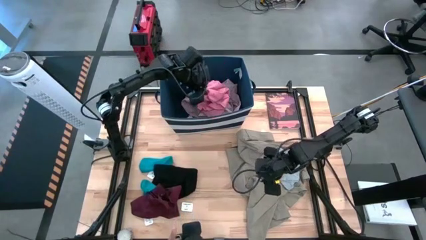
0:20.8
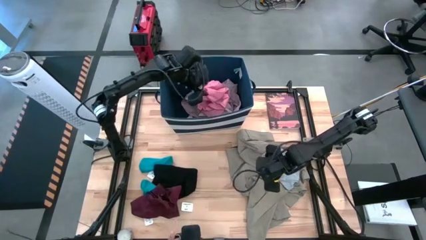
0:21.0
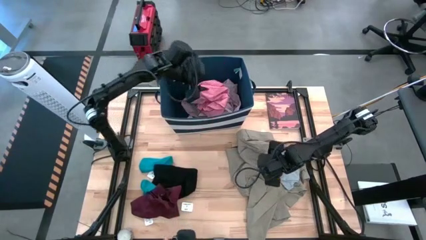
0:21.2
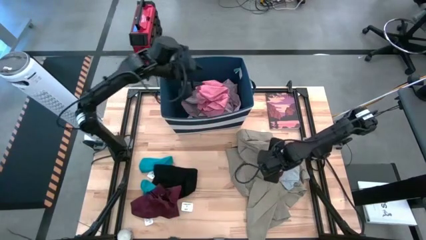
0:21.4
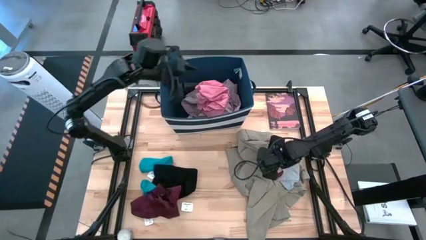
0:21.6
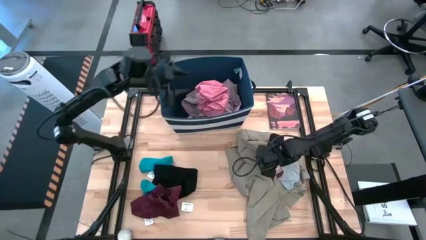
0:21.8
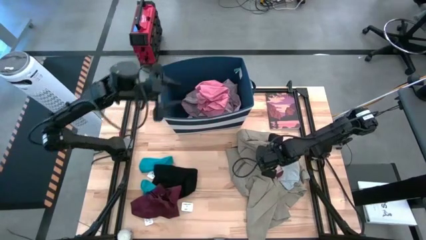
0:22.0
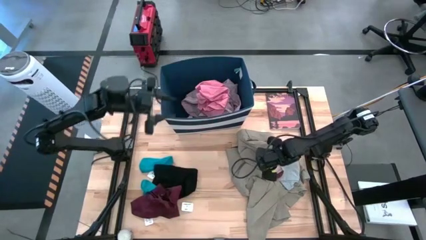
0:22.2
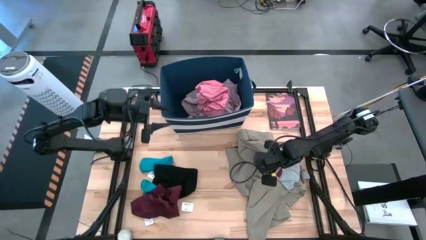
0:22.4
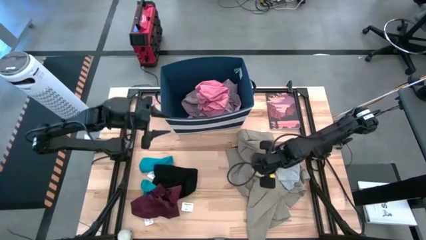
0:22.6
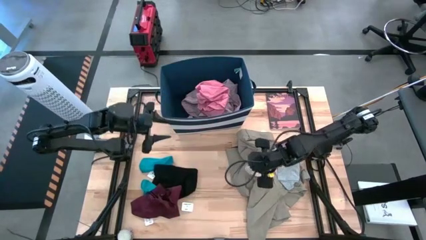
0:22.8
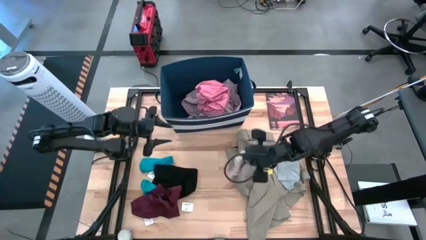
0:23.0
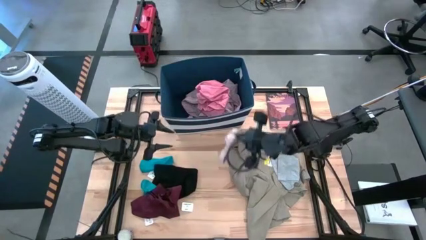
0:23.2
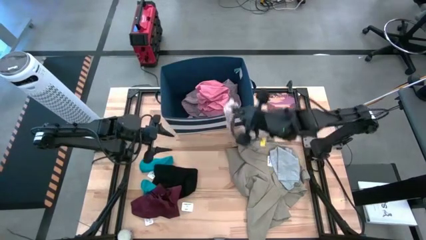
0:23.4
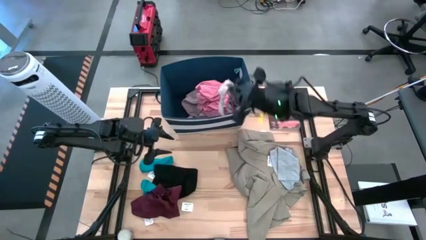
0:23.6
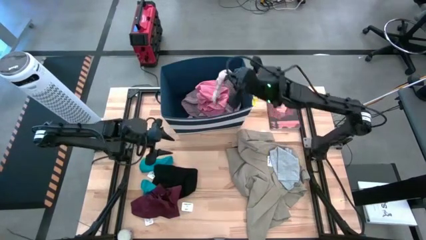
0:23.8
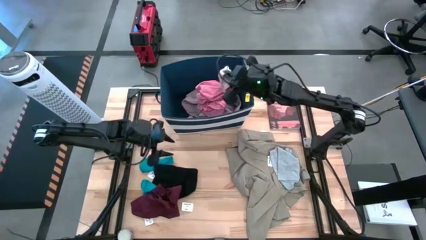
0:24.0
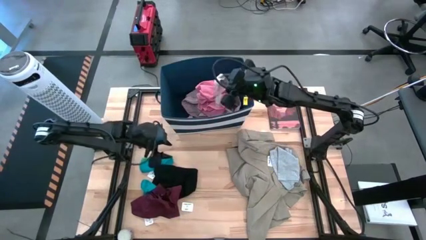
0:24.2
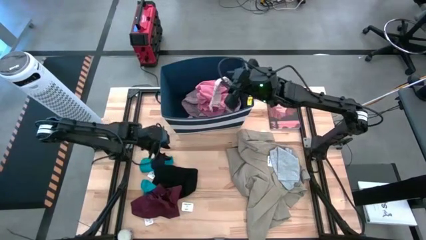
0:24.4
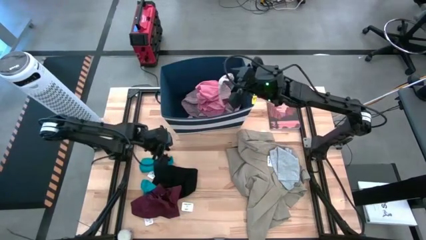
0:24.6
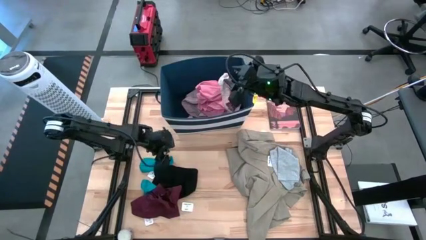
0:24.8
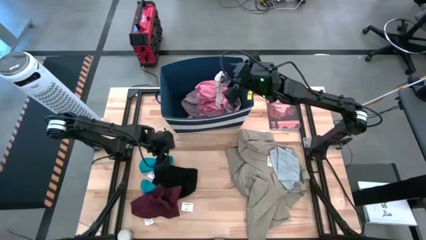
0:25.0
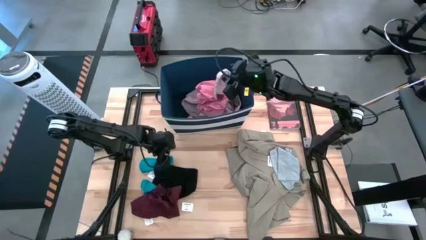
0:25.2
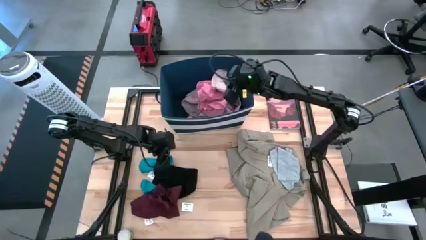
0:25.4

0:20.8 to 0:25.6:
Task: Sort clothes
Put the pink sock into the blue laundry bin

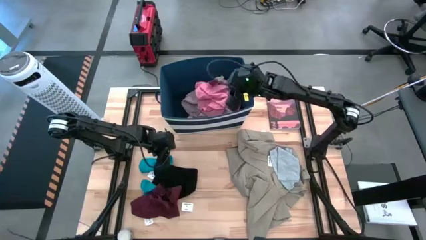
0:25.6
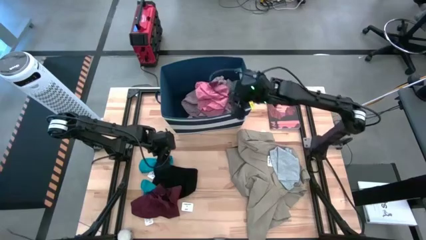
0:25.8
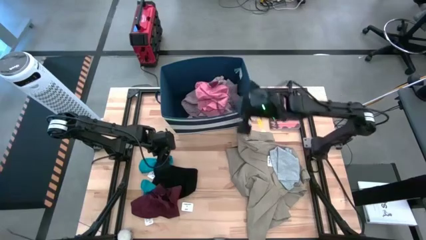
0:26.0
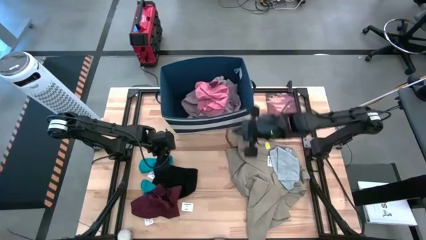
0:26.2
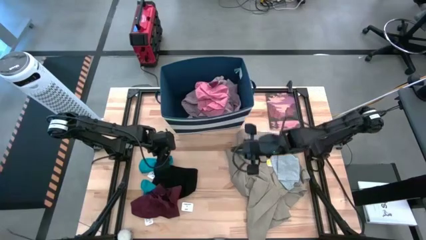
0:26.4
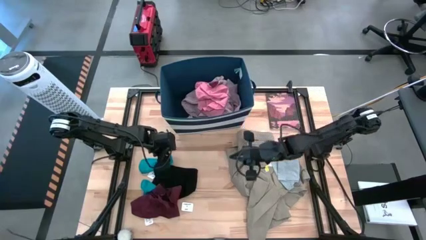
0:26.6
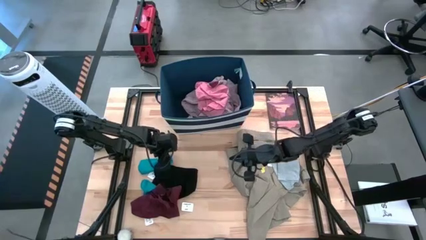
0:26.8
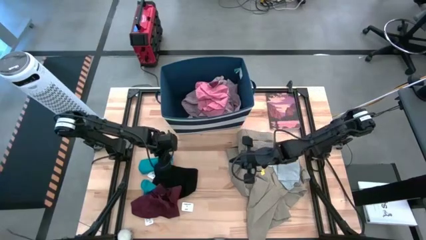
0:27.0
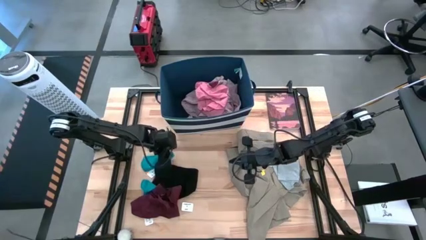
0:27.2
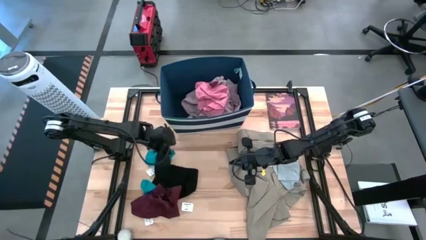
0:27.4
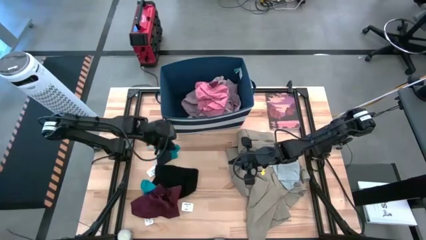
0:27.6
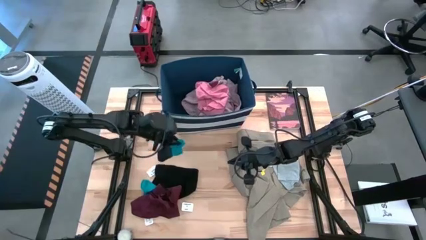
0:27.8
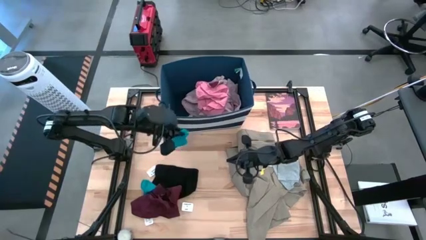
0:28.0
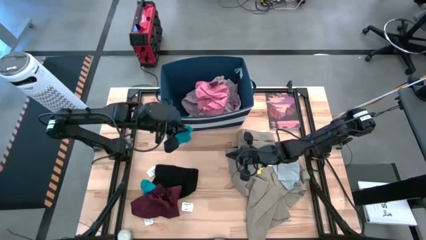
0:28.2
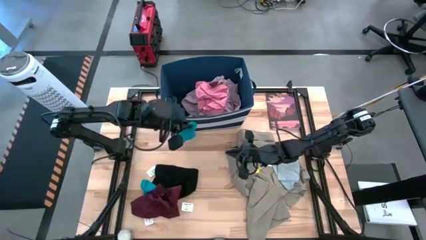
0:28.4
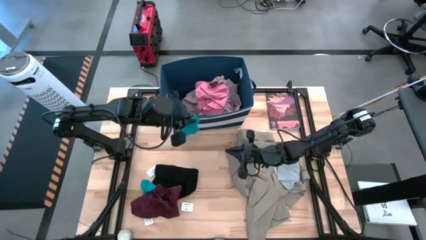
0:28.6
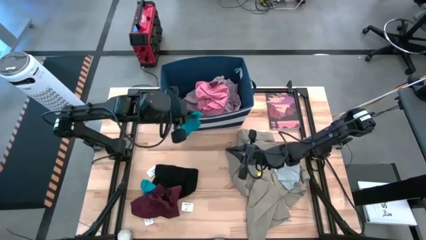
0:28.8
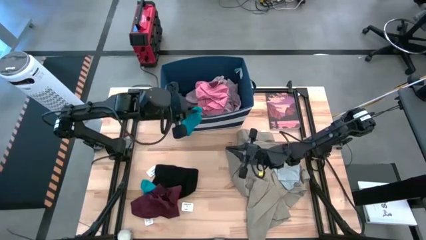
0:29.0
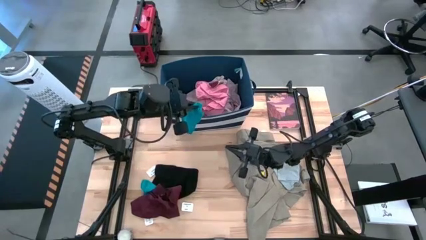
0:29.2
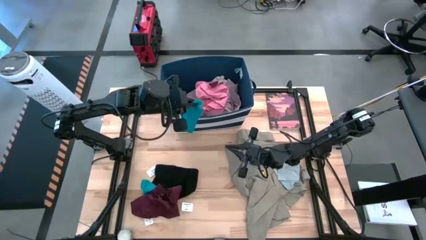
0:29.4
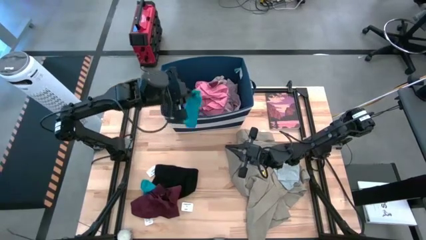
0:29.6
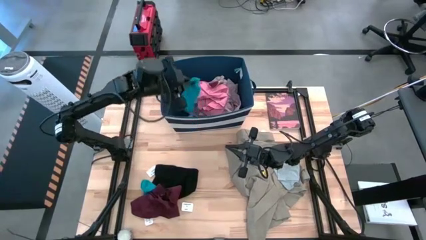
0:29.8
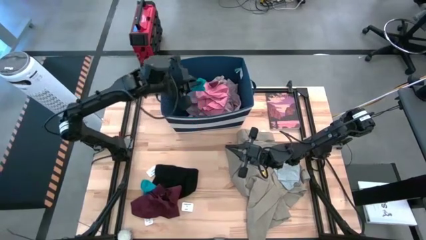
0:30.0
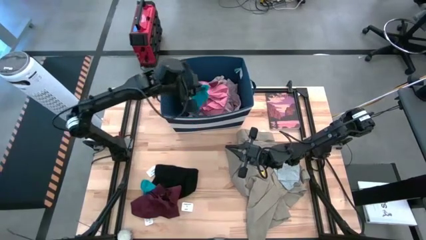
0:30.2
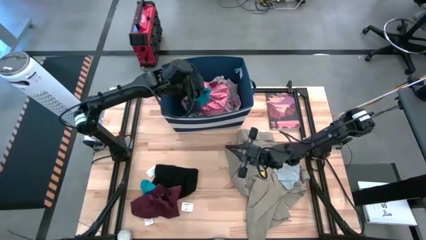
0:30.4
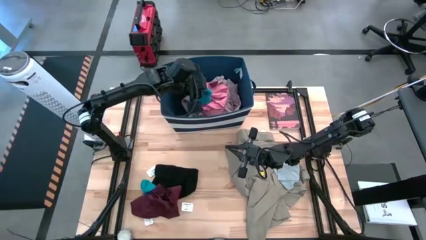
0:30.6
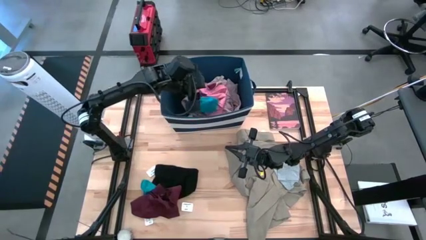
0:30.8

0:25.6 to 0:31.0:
Put the blue sock into the blue laundry bin

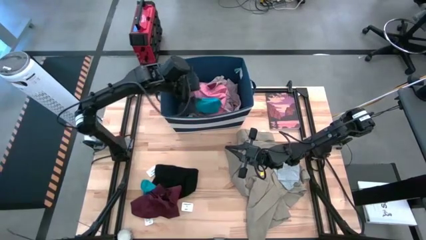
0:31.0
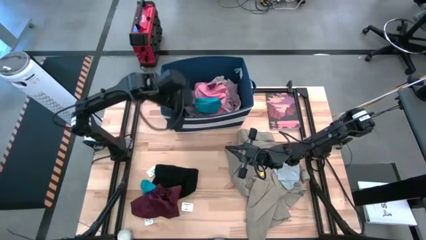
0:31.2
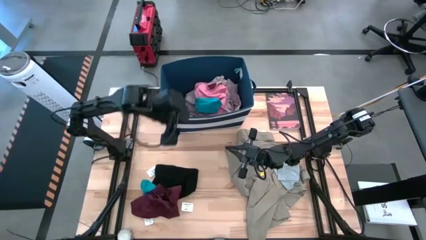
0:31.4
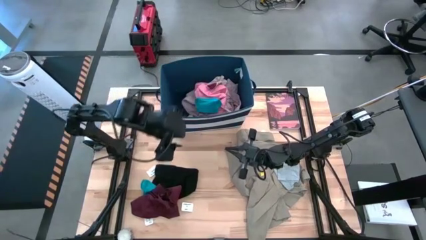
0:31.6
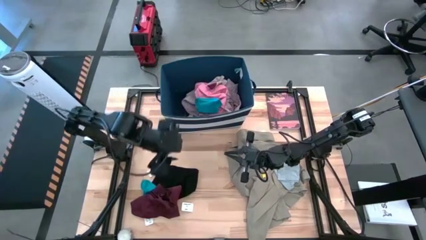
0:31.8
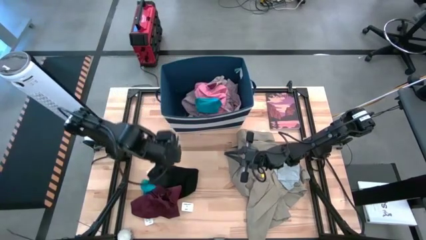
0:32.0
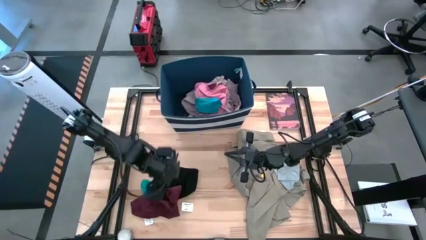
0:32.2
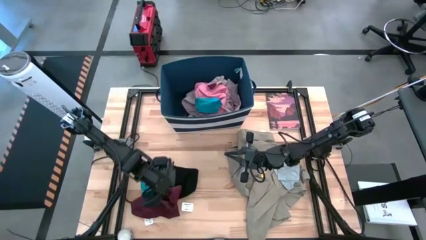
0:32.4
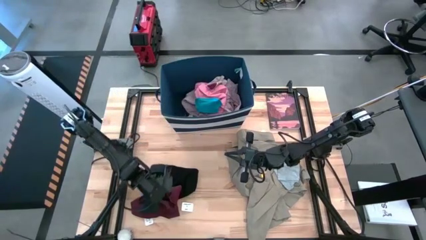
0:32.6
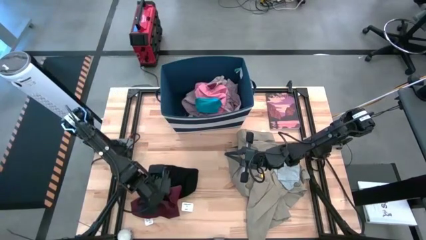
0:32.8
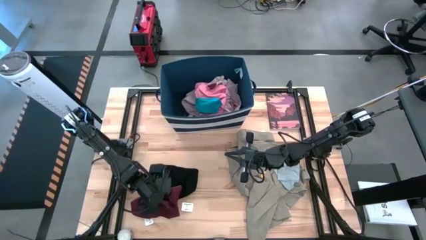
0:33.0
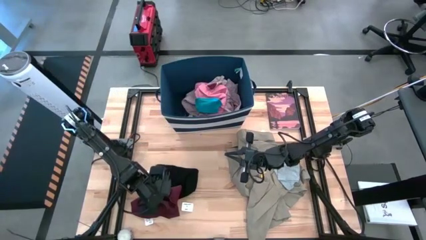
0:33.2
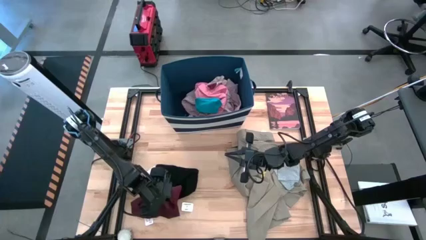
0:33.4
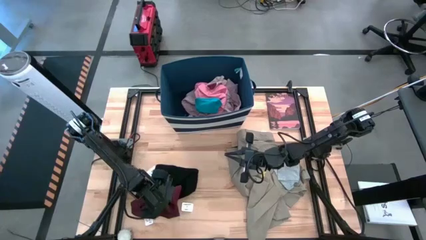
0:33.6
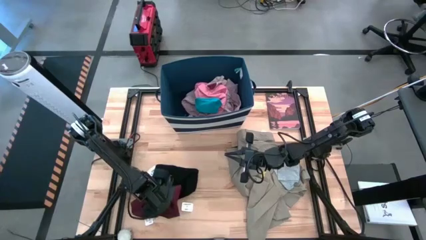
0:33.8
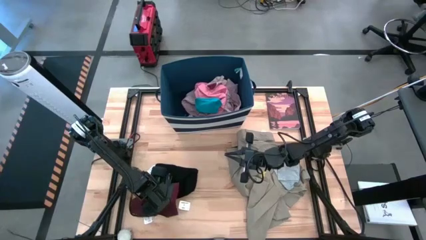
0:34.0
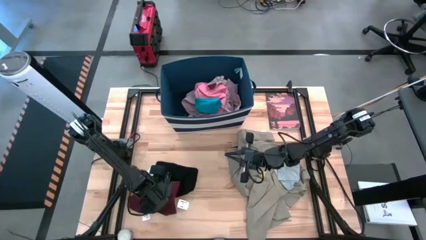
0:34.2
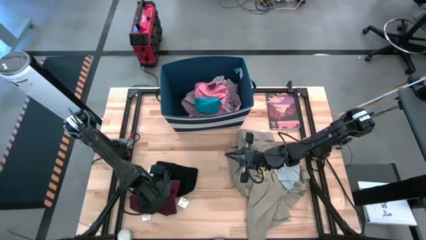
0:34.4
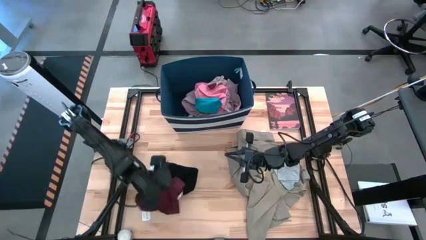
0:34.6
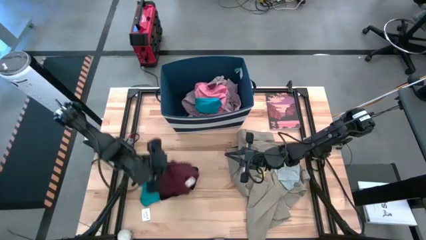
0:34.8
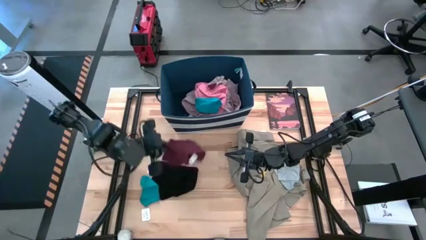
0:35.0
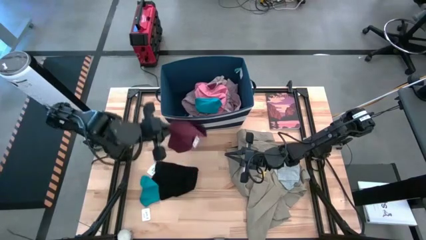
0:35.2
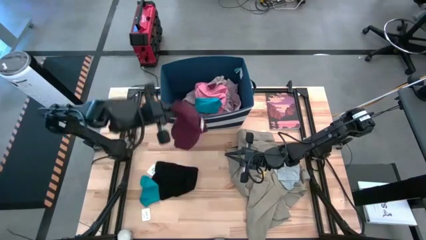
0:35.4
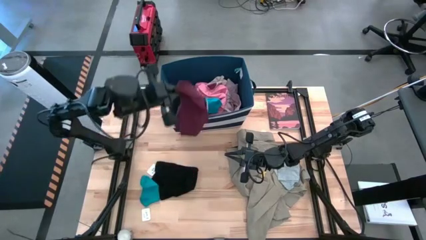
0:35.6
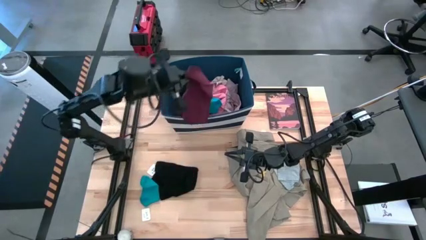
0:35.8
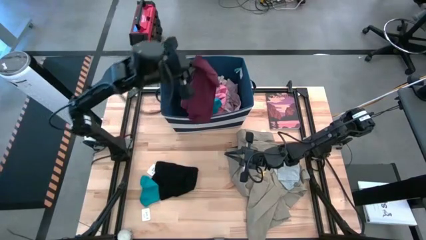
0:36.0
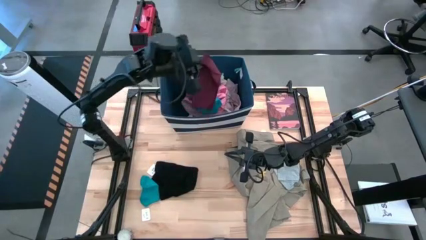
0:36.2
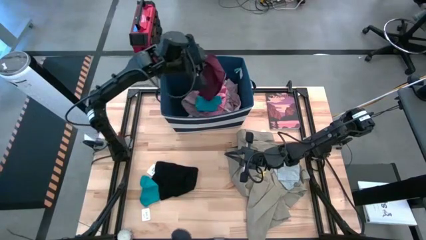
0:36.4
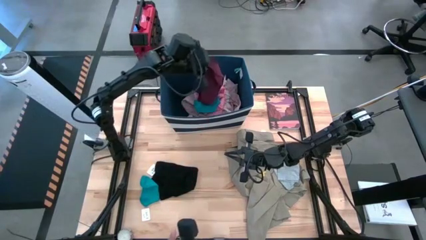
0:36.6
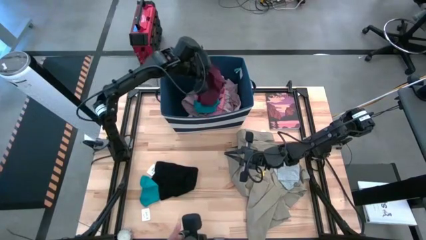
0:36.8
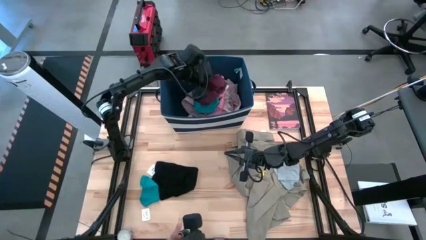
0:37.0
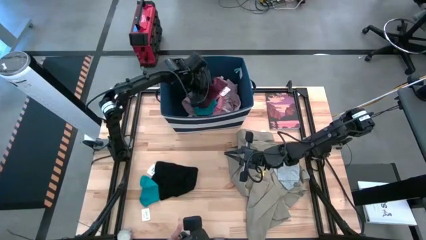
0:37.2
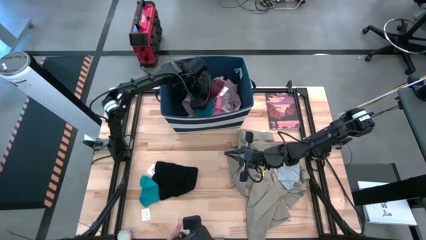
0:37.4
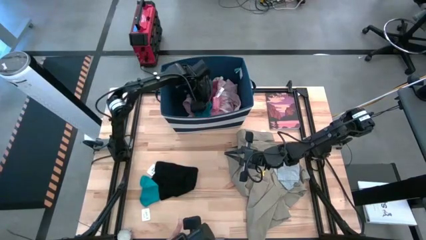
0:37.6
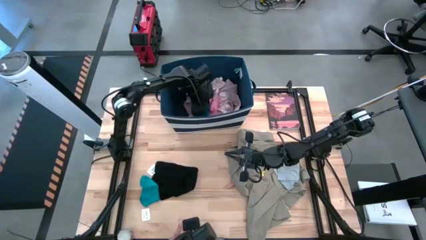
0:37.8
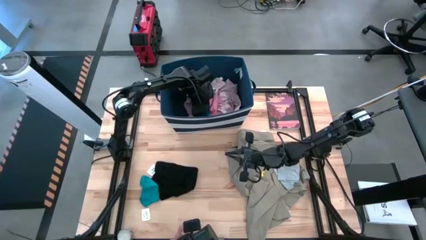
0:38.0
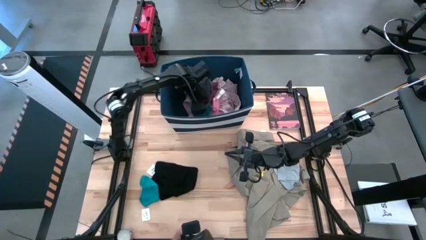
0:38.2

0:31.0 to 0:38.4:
Put the maroon underwear into the blue laundry bin
